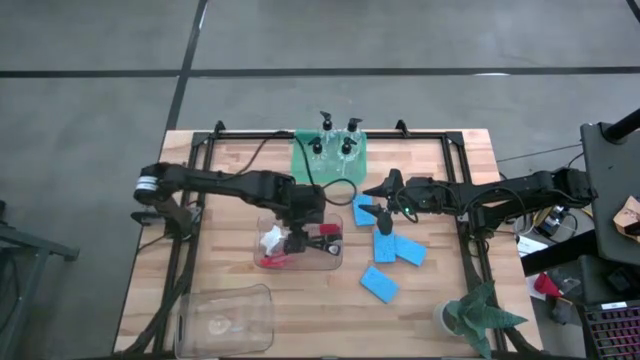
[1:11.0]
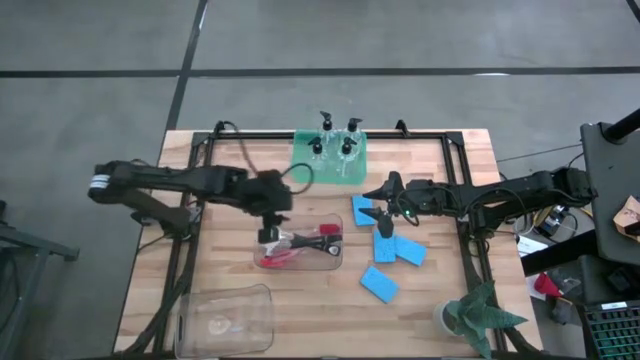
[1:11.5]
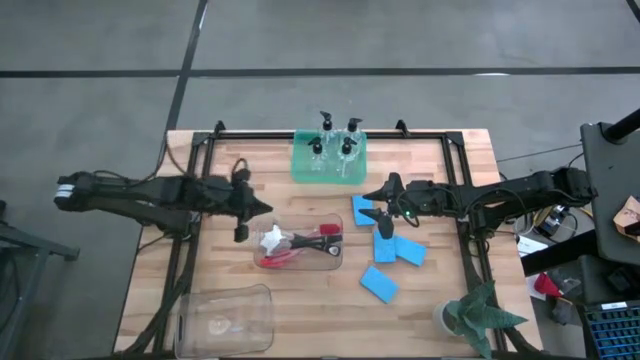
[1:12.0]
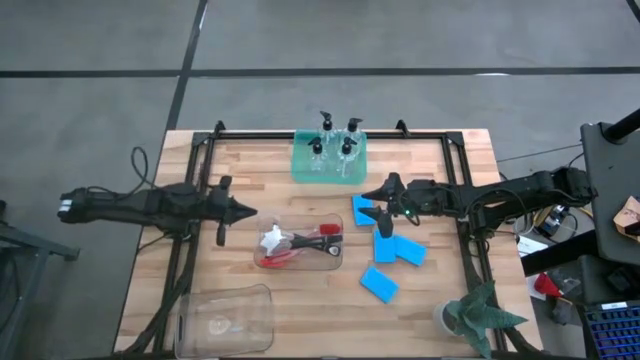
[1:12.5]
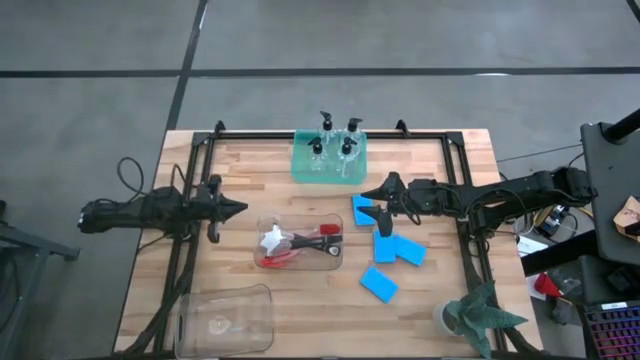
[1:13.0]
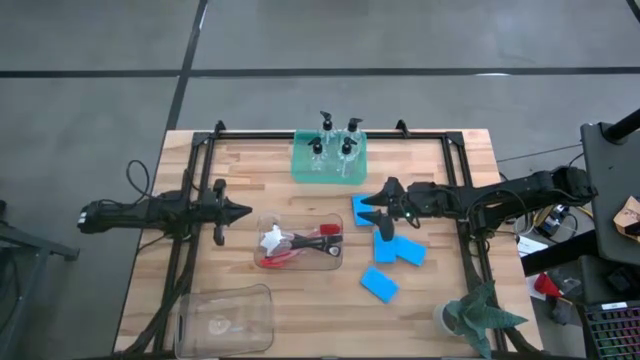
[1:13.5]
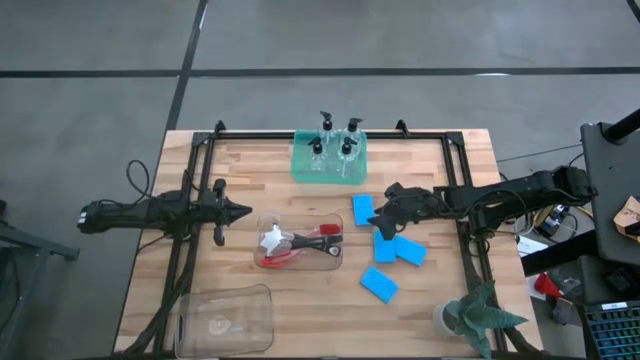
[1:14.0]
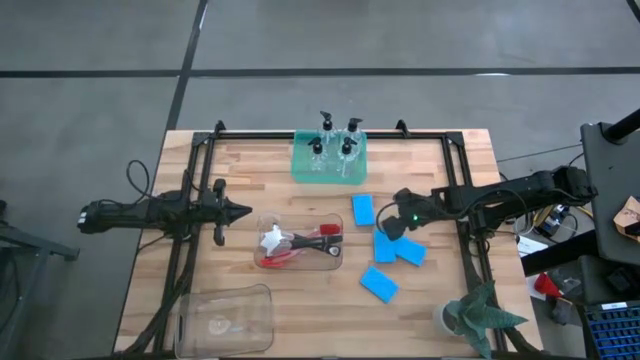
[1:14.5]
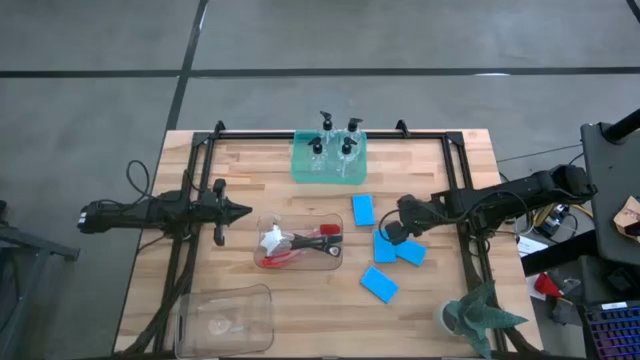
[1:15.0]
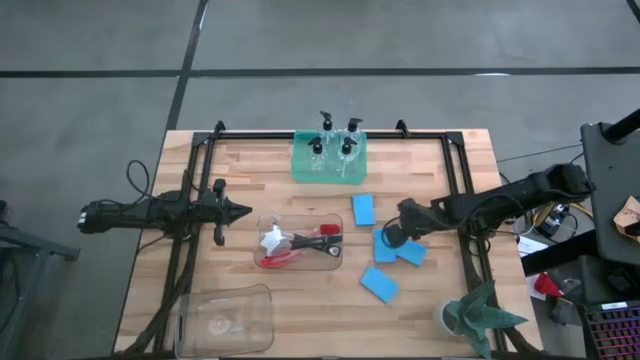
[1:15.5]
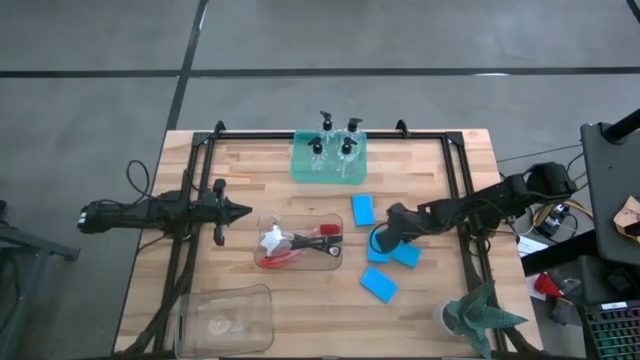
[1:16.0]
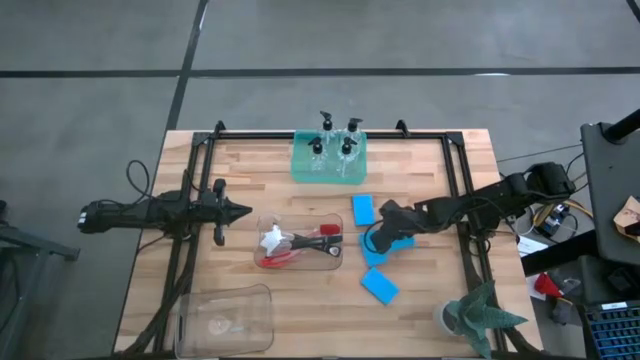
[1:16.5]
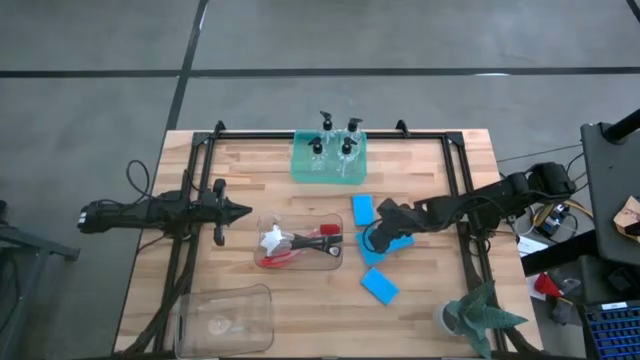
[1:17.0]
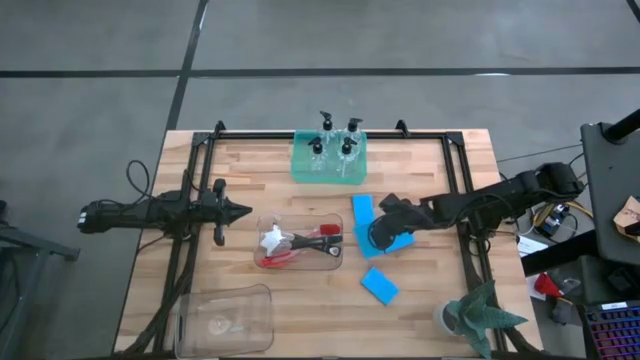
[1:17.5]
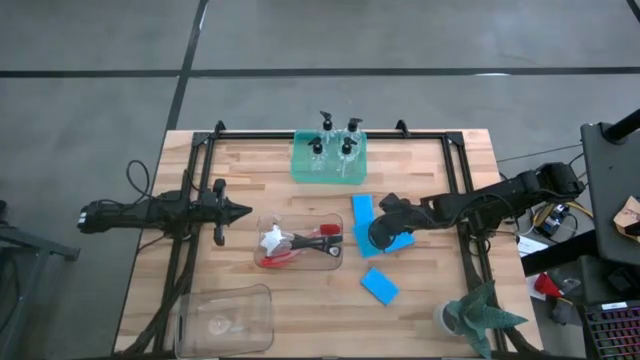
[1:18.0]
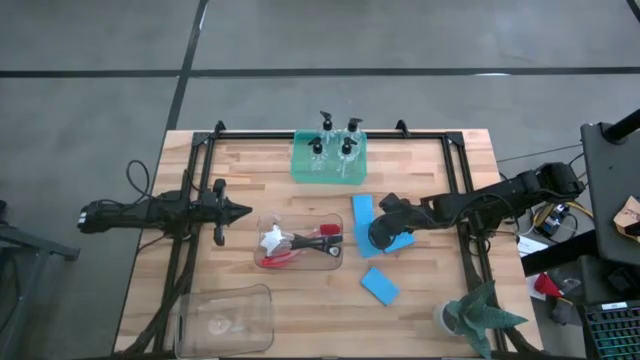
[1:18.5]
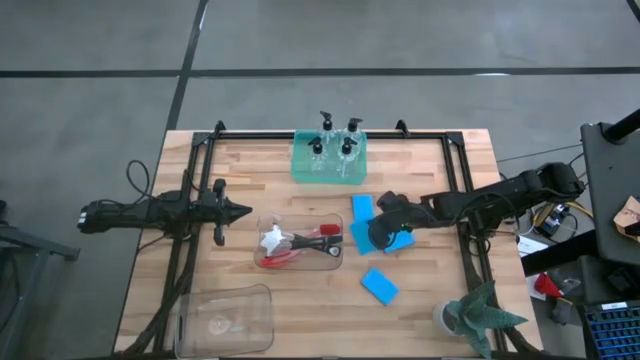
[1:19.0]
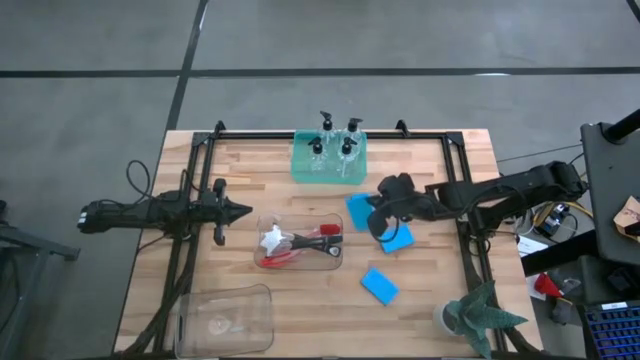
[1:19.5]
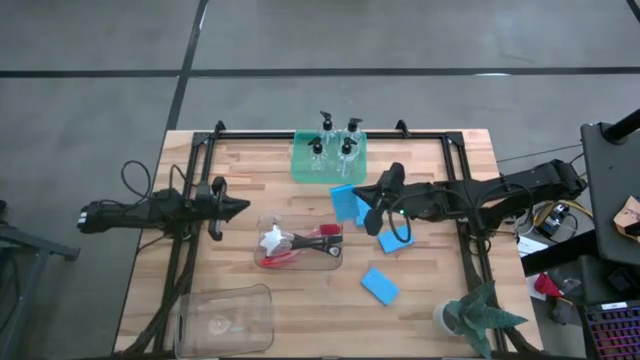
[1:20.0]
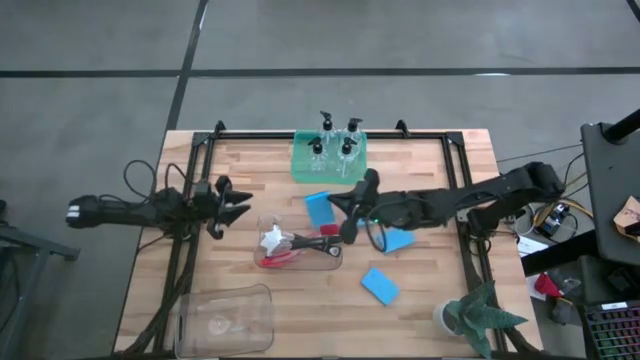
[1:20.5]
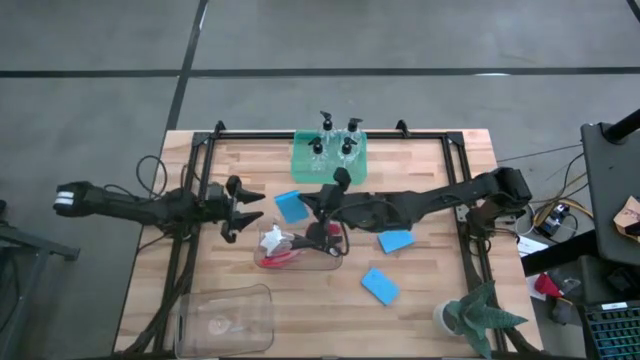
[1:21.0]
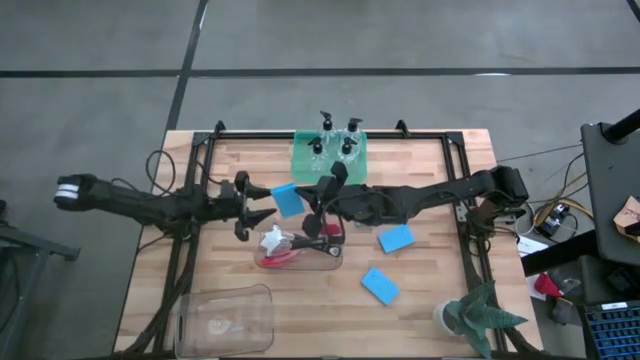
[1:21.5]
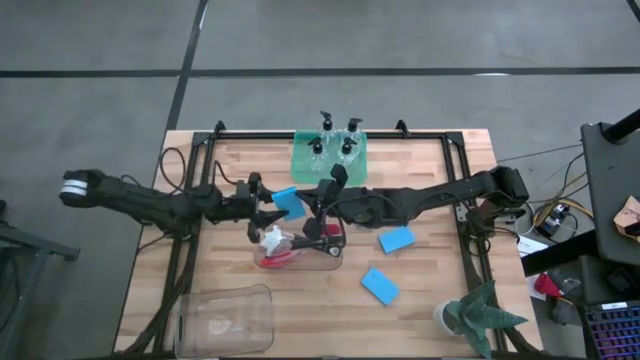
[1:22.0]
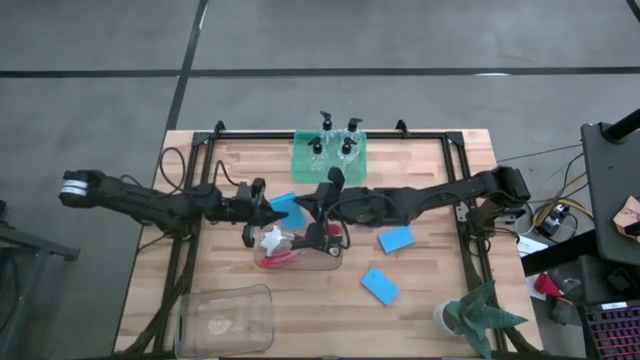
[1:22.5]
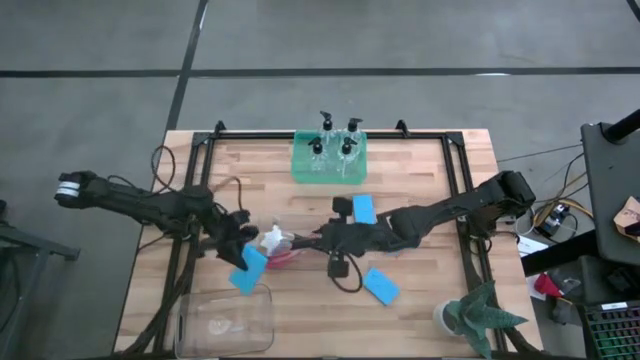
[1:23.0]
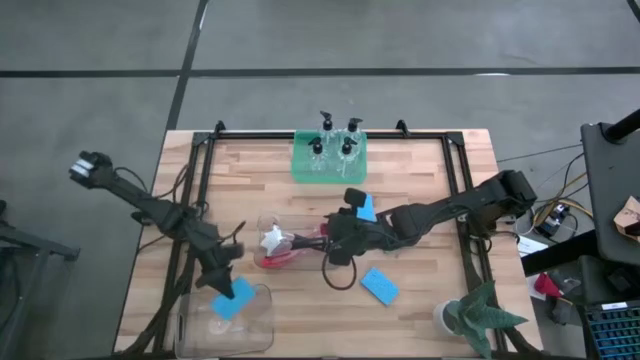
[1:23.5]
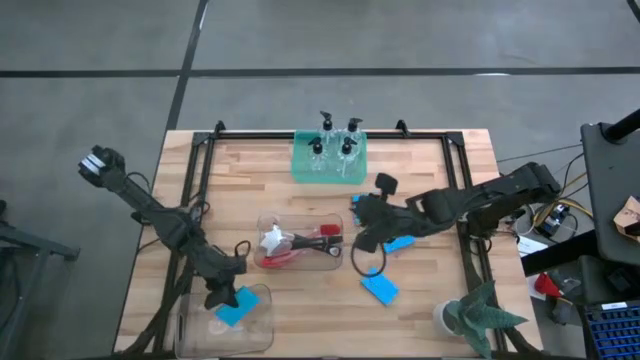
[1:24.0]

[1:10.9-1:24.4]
Task: Pick & Place Kitchen Sink Supplies
Put the blue sponge into the bottom transparent bin

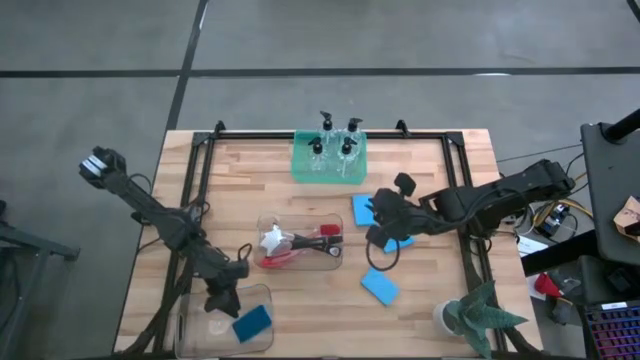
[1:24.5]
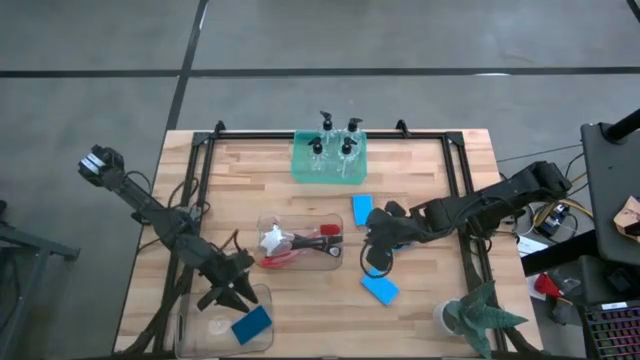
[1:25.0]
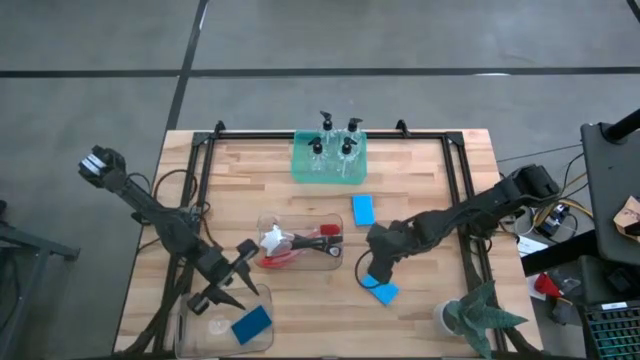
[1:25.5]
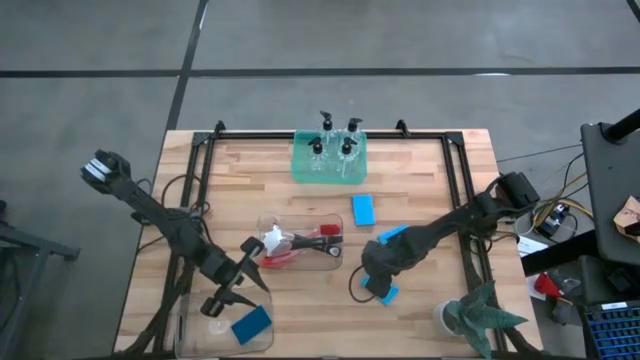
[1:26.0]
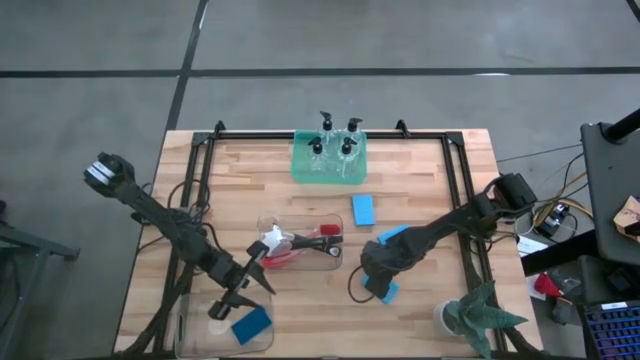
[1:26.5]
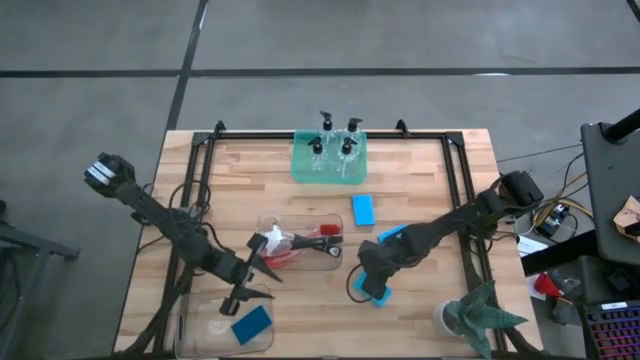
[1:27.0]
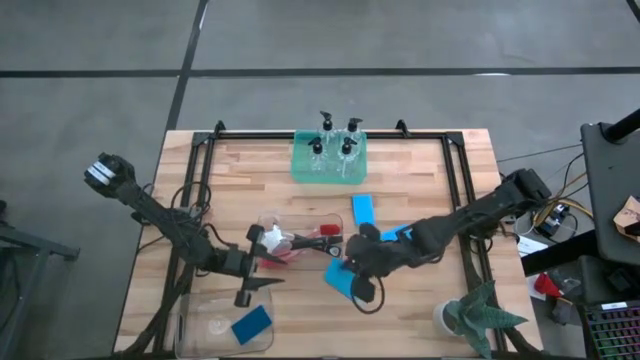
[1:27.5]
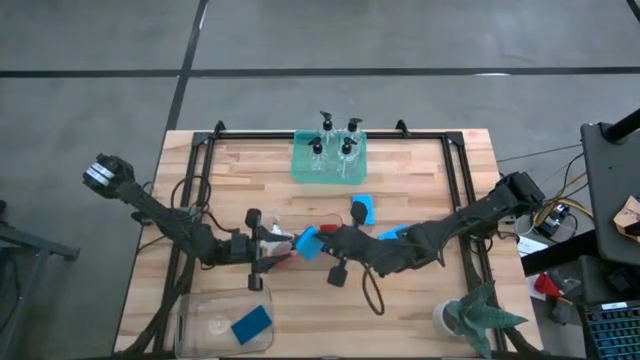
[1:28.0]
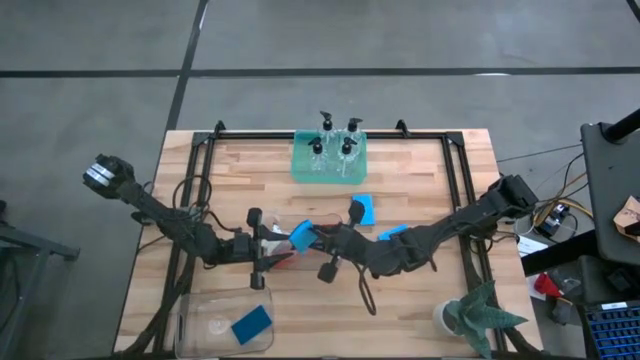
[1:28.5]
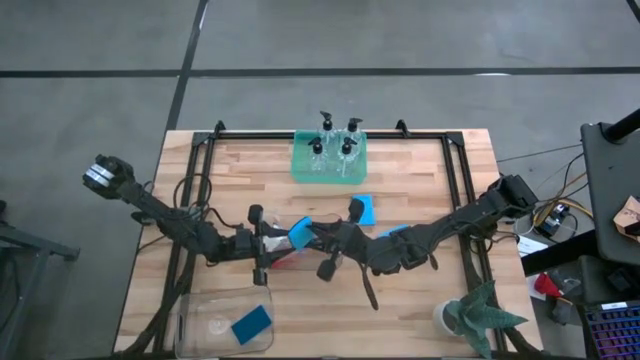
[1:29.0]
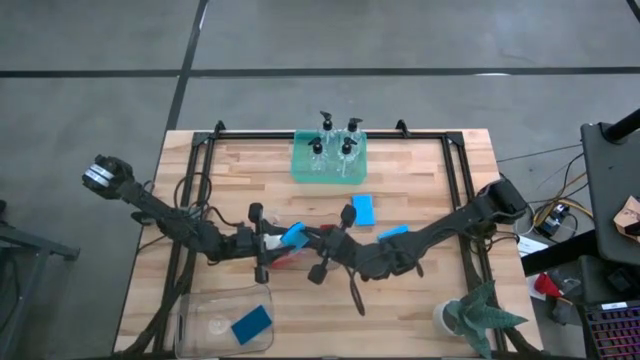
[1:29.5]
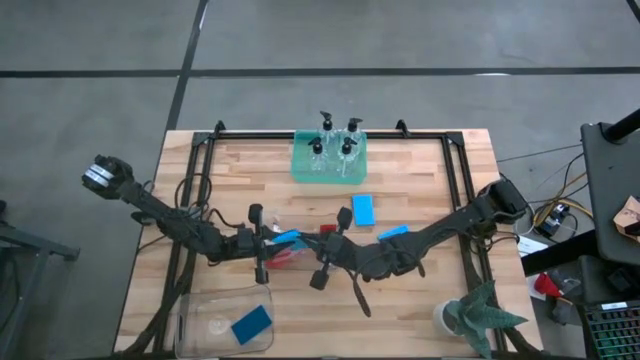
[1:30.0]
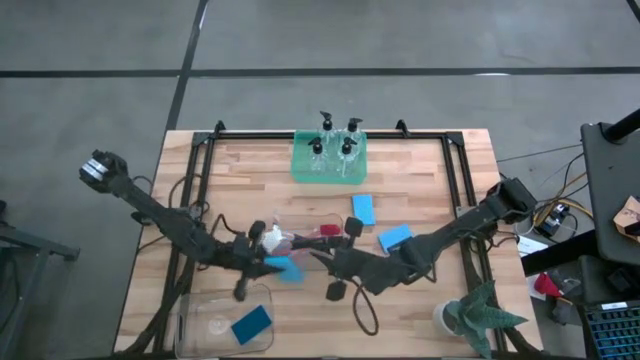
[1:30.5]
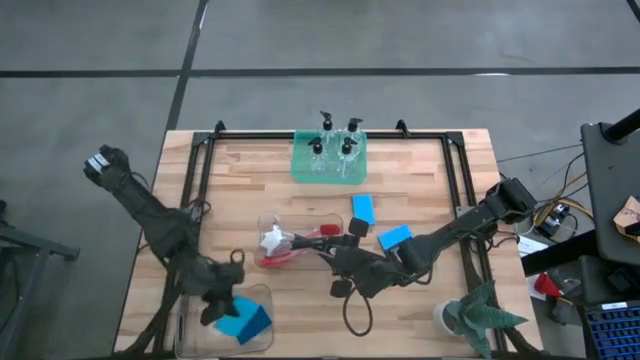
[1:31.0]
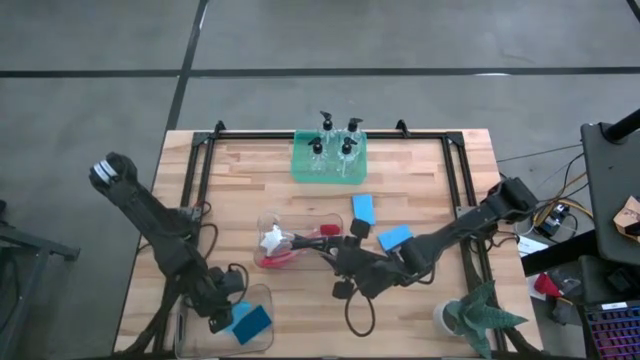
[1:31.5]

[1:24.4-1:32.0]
Put the blue sponge into the bottom transparent bin

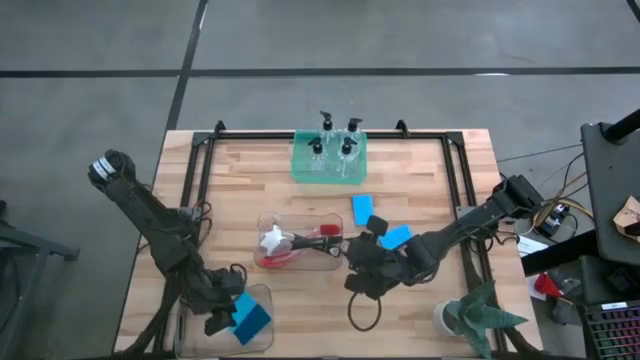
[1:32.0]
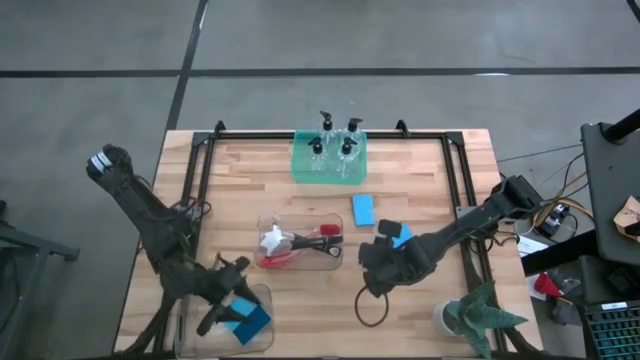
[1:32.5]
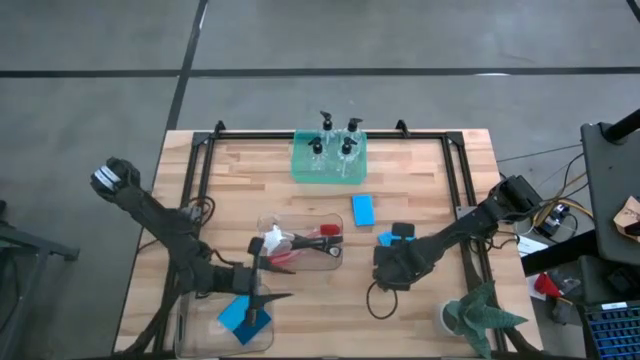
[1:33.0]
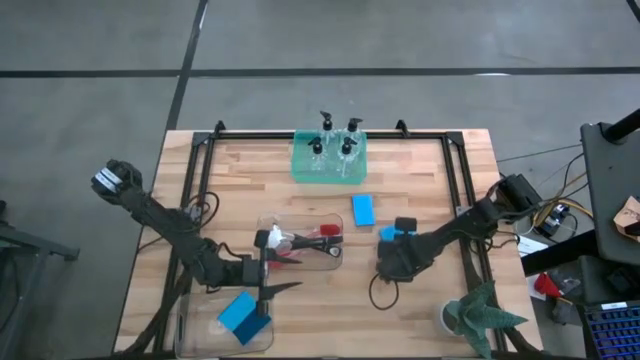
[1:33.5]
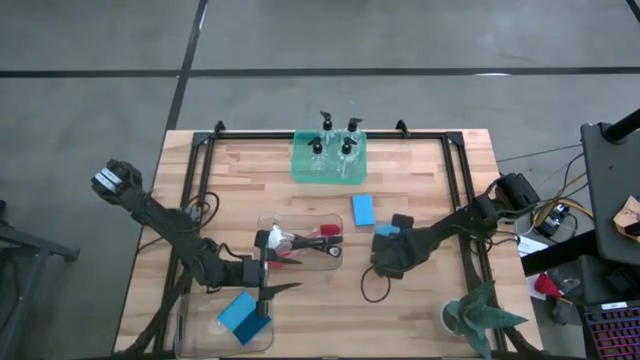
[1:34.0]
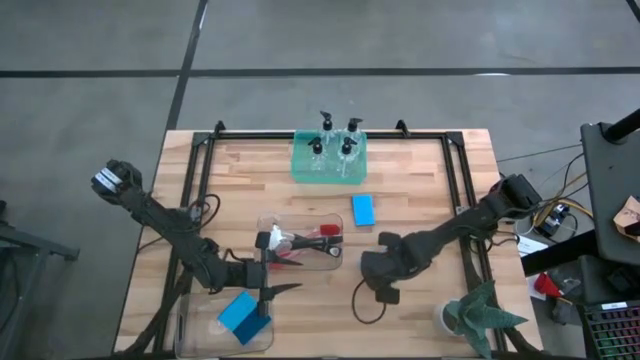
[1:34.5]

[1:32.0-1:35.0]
Put the blue sponge into the bottom transparent bin
